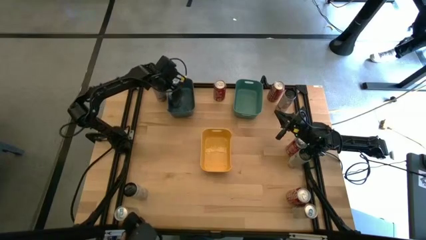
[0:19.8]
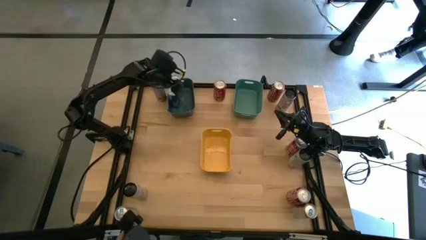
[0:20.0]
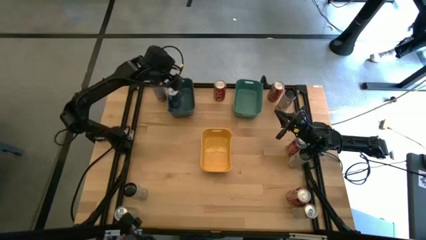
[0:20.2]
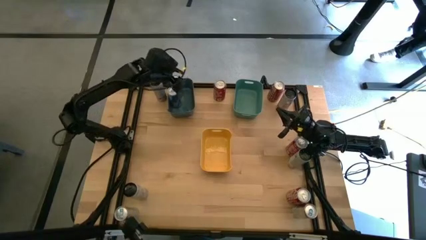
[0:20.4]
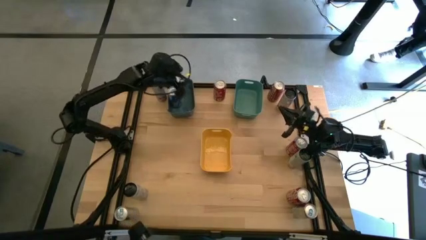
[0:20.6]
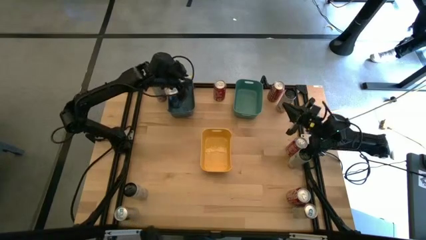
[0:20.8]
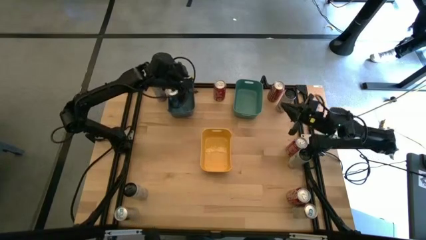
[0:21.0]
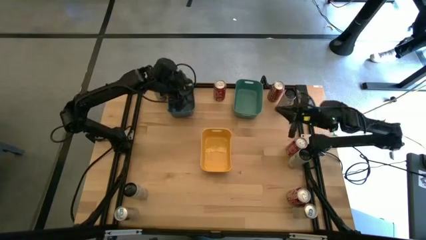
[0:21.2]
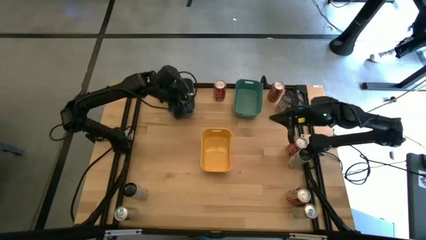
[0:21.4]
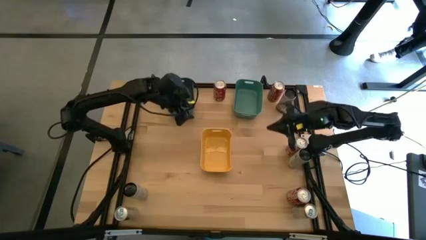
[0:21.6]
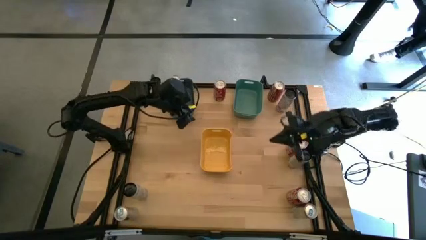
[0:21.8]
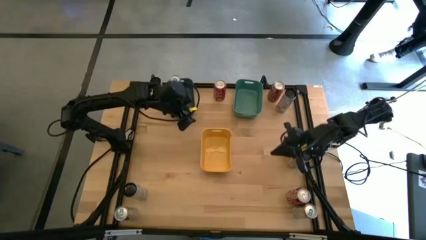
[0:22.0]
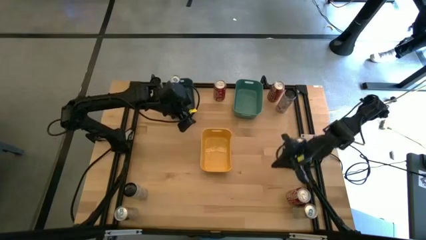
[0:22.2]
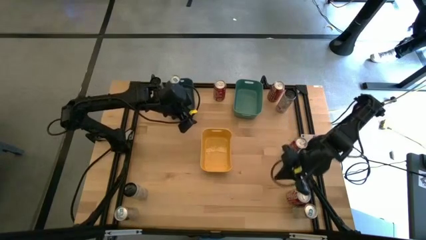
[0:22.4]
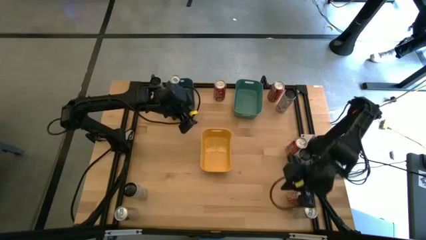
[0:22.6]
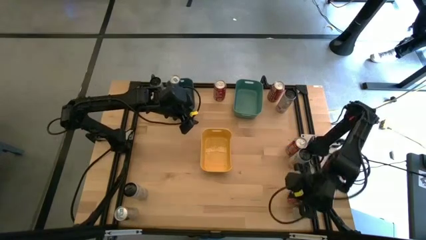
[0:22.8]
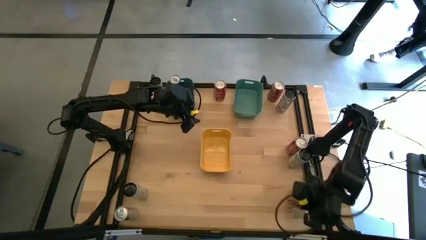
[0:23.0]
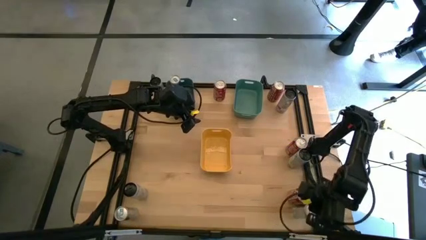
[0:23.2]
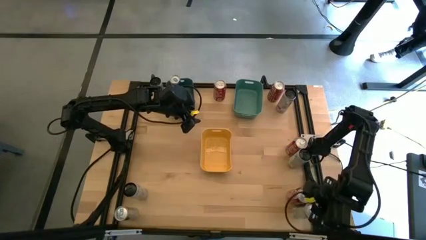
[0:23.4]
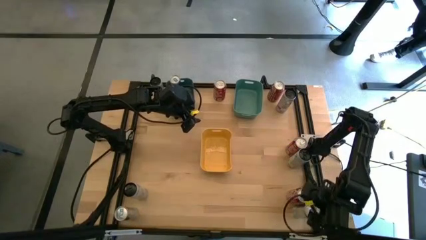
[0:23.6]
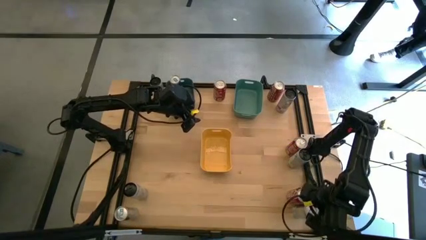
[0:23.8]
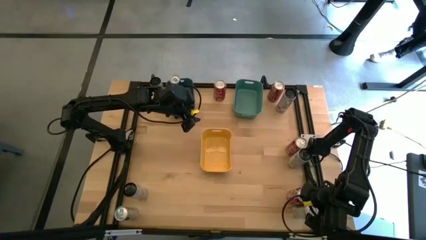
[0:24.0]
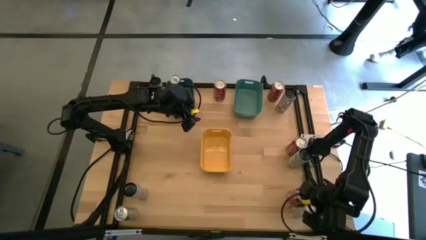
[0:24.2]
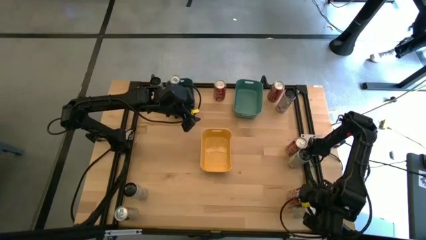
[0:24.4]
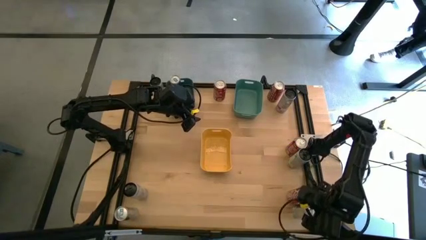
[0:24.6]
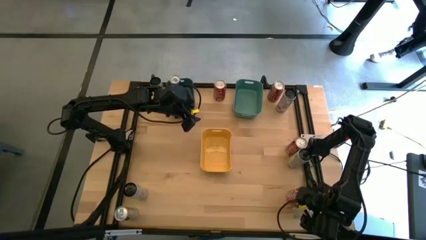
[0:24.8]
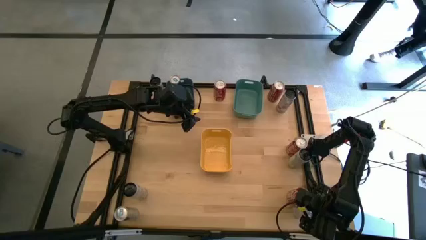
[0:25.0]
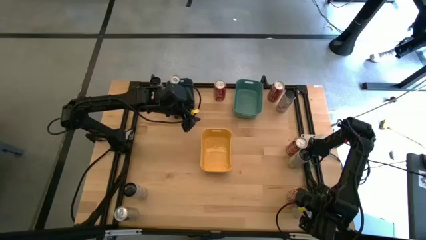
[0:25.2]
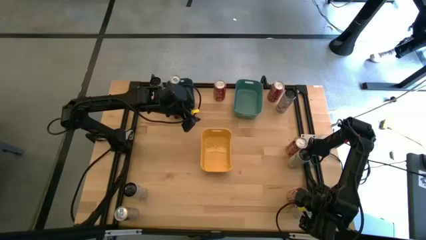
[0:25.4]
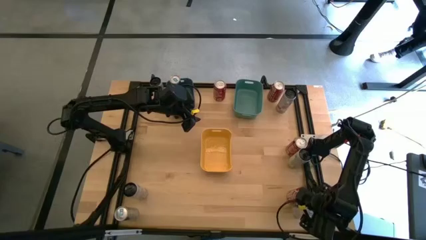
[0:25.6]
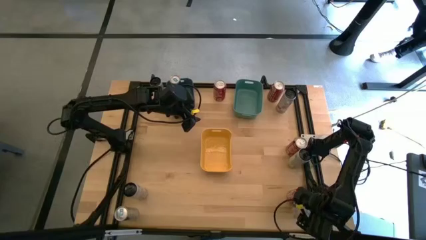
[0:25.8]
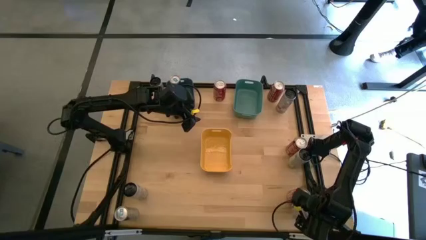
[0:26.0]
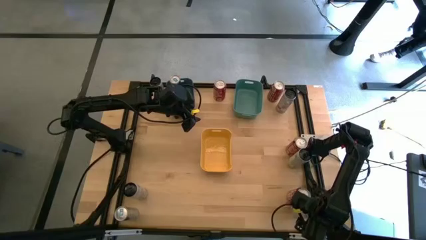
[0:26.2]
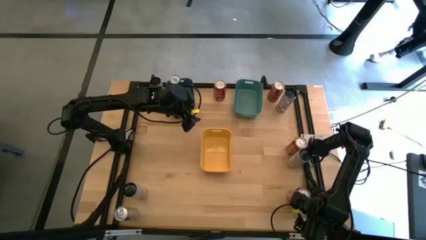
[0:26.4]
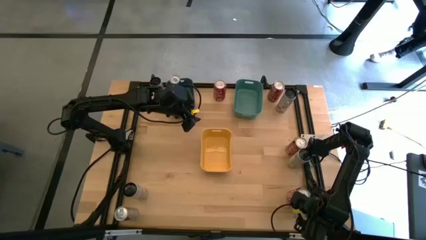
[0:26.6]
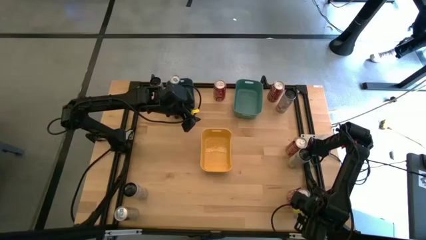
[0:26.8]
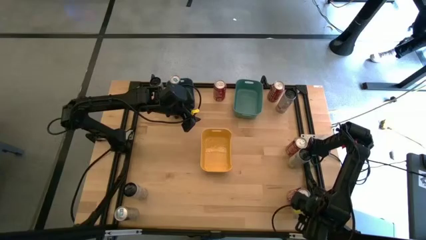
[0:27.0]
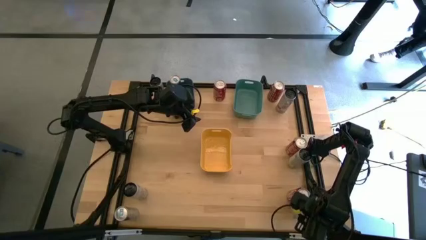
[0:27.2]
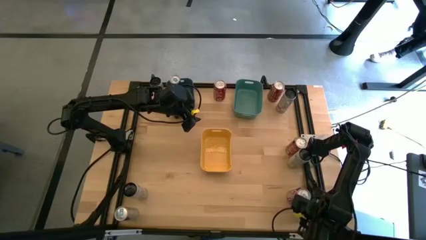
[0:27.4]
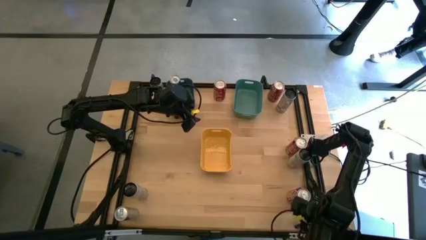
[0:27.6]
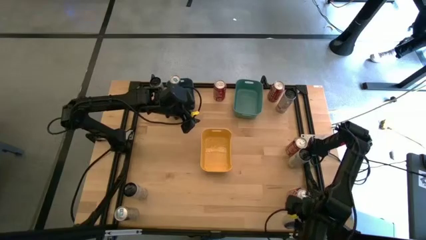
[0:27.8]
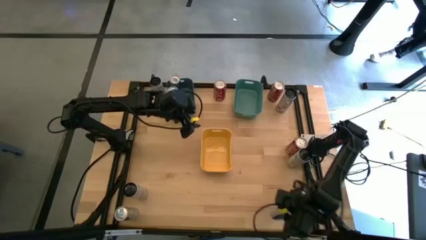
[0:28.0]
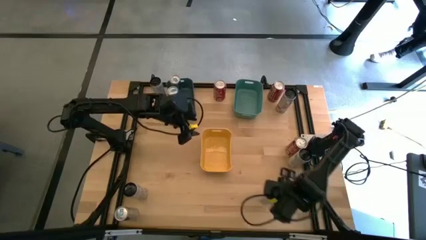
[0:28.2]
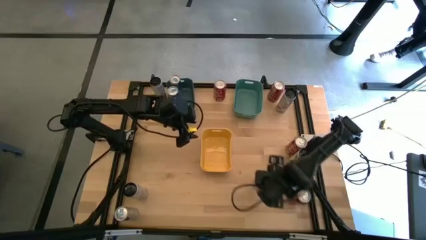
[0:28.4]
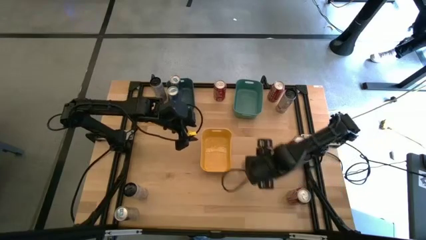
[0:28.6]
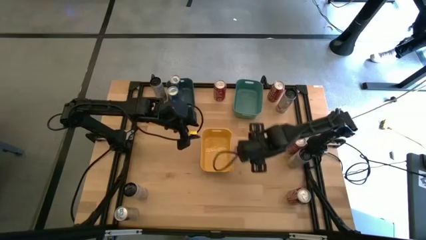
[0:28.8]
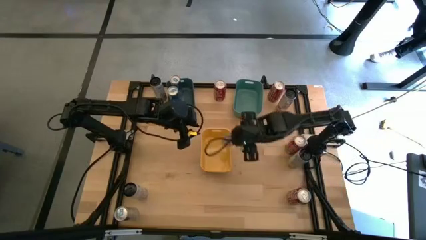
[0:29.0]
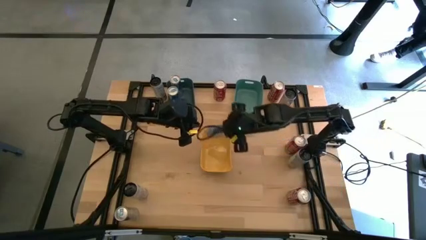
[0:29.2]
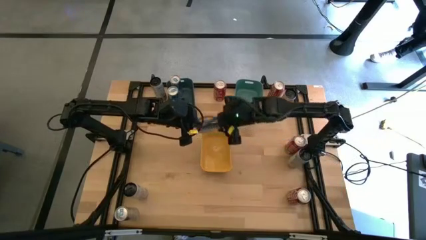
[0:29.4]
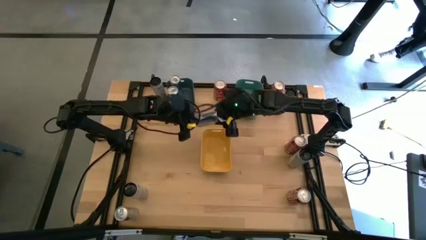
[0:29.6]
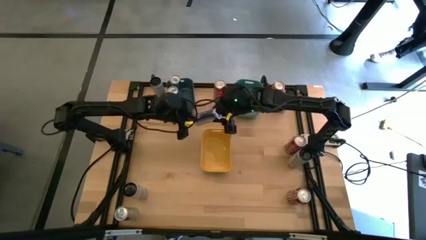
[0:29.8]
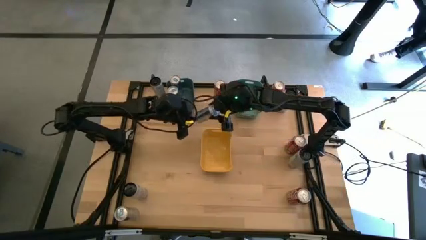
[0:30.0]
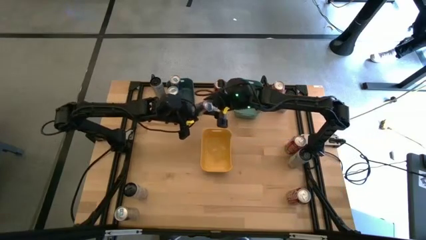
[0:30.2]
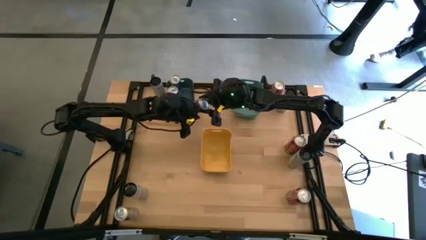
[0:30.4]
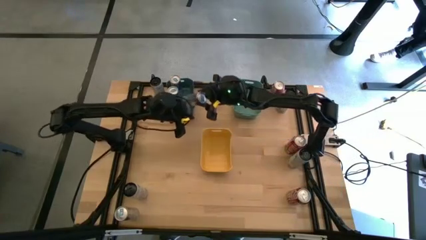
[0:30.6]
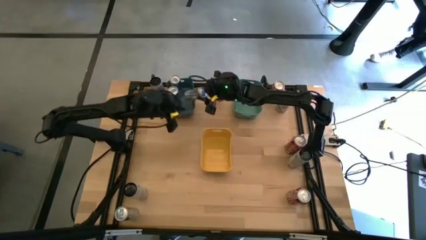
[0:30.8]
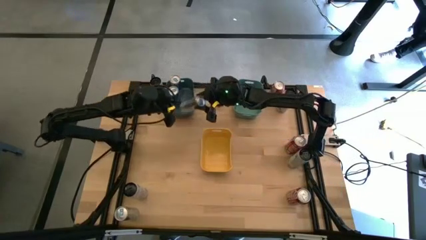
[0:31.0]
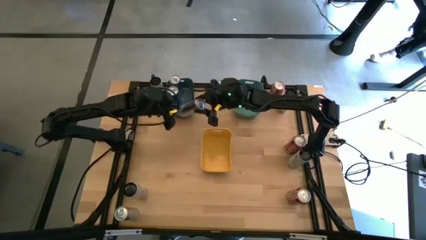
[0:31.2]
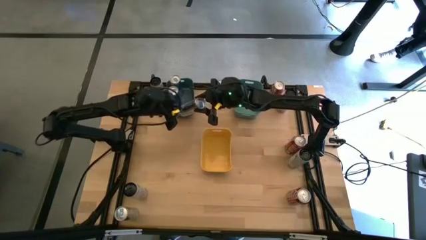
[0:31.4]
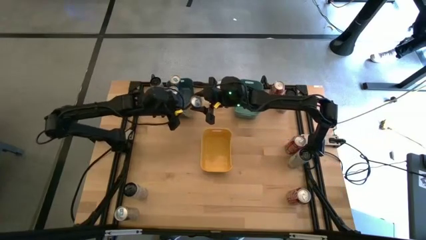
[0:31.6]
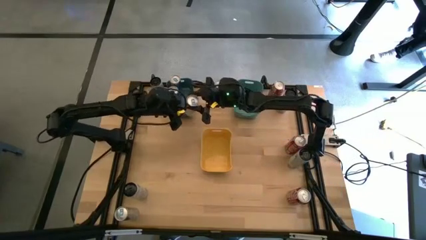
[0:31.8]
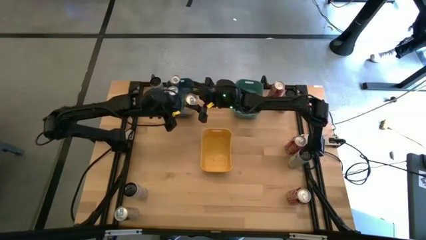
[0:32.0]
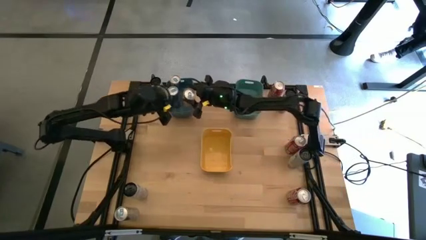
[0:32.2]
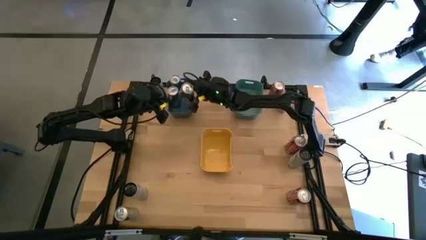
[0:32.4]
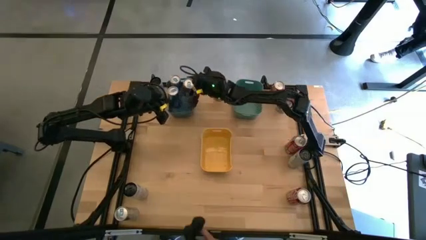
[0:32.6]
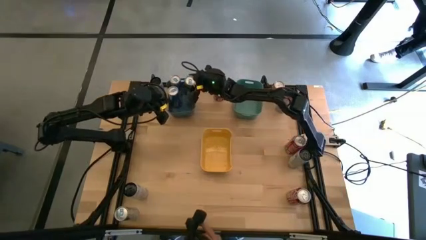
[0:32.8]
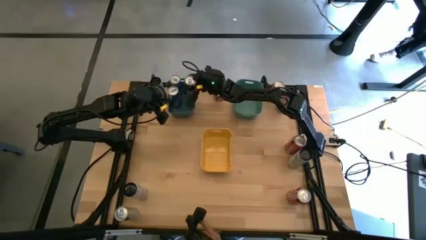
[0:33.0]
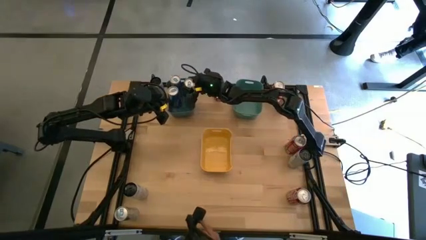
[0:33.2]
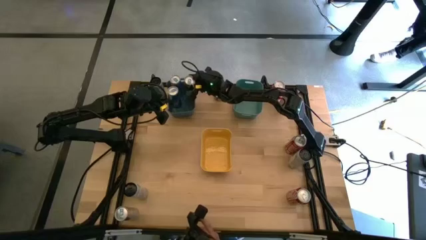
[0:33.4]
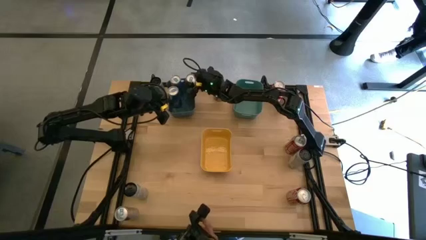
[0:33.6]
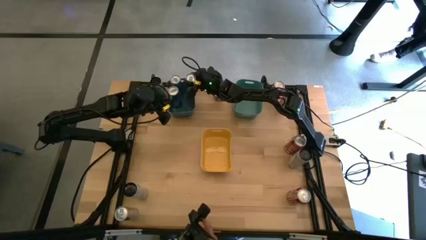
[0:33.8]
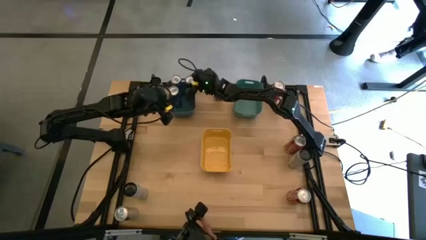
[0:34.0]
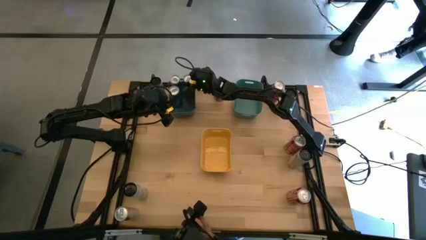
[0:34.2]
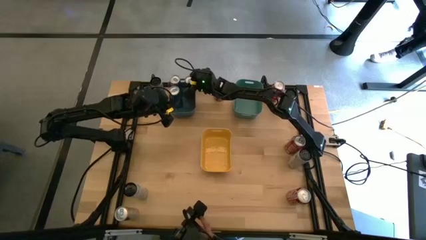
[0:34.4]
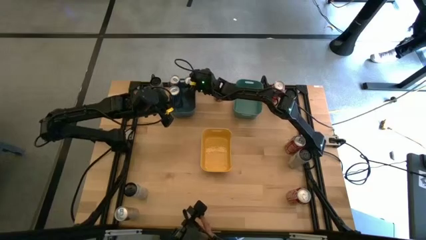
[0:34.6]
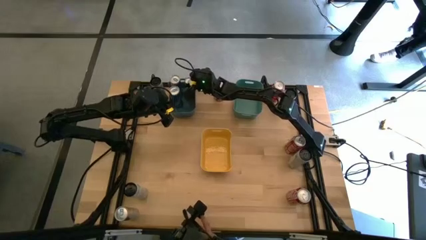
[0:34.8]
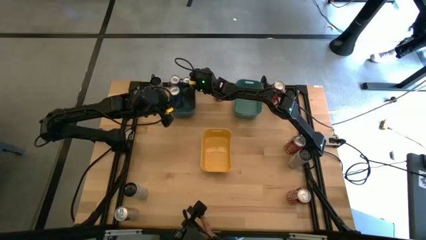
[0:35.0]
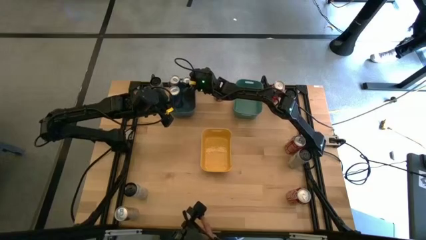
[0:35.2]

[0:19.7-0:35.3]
Task: Sort soda cans
Put the right blue soda can into the blue bin
